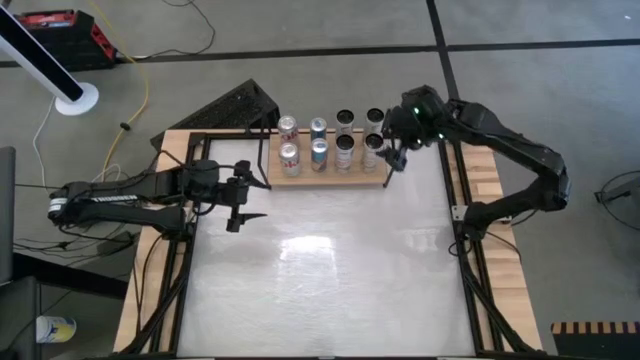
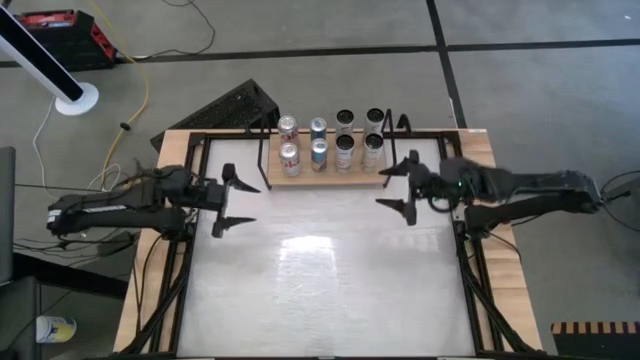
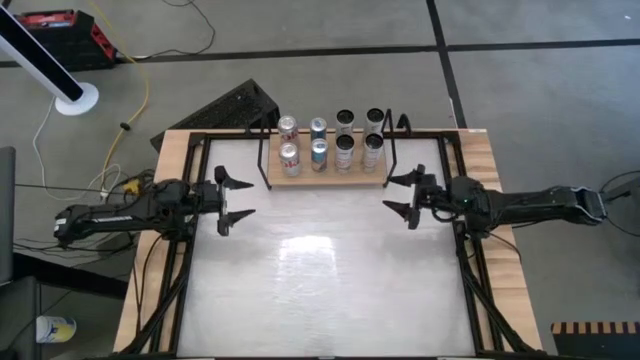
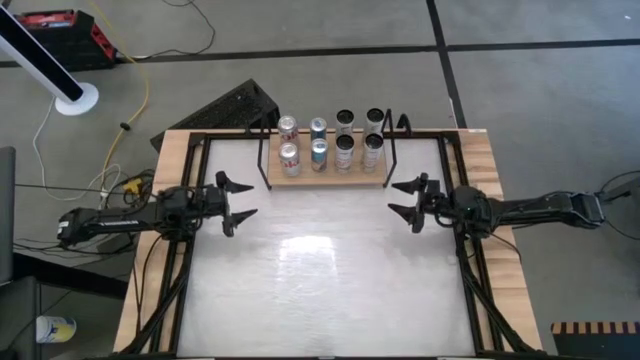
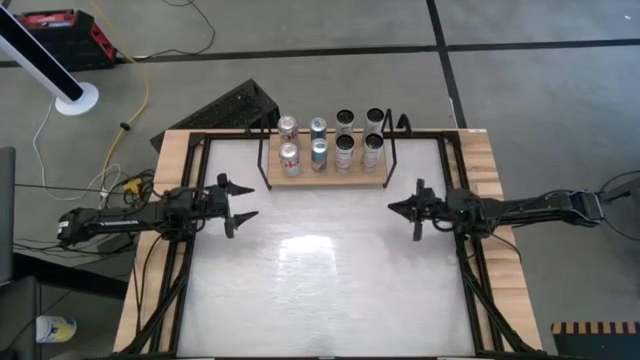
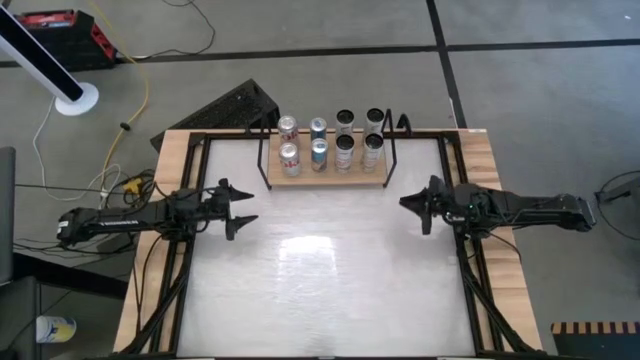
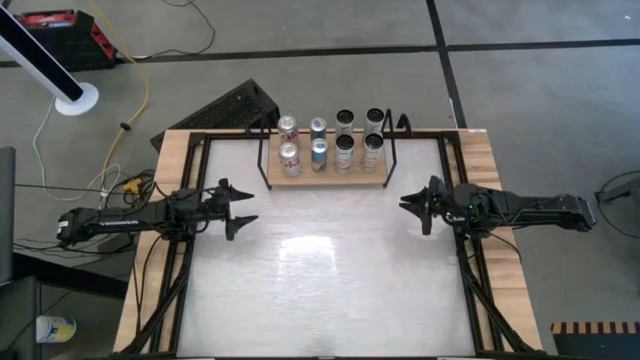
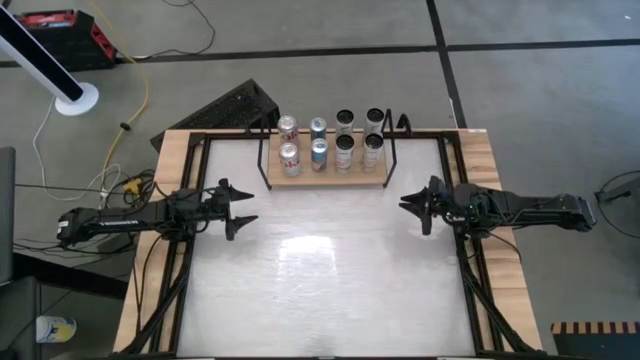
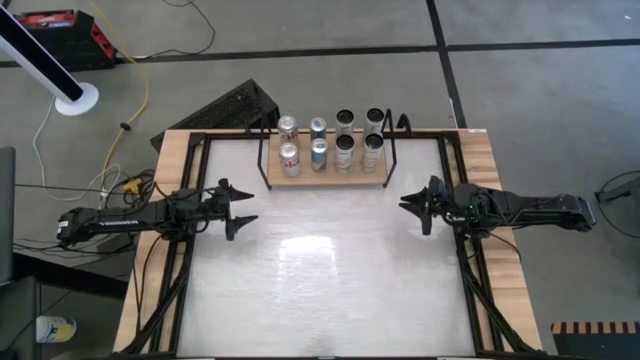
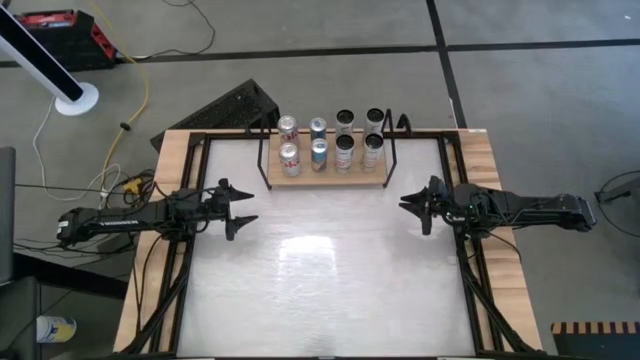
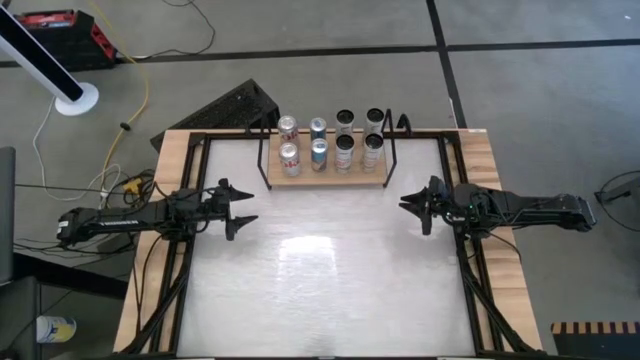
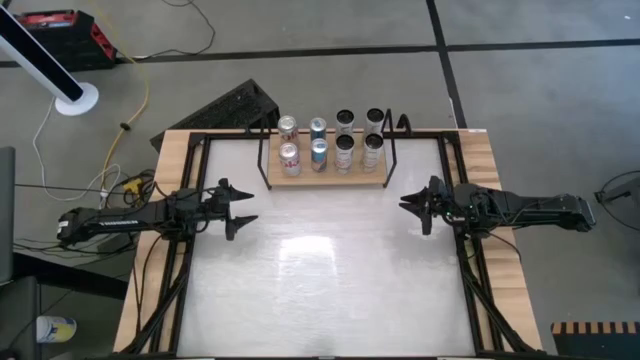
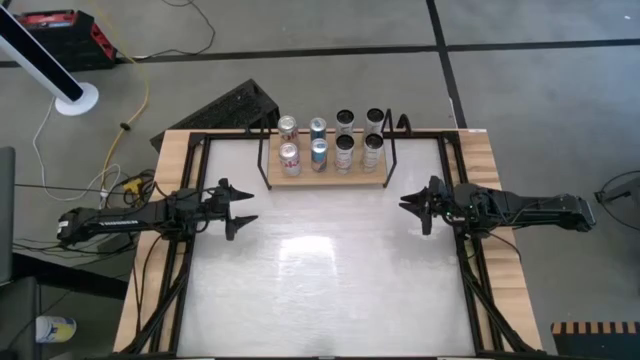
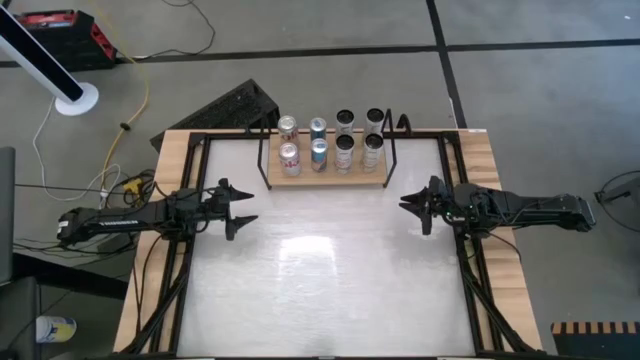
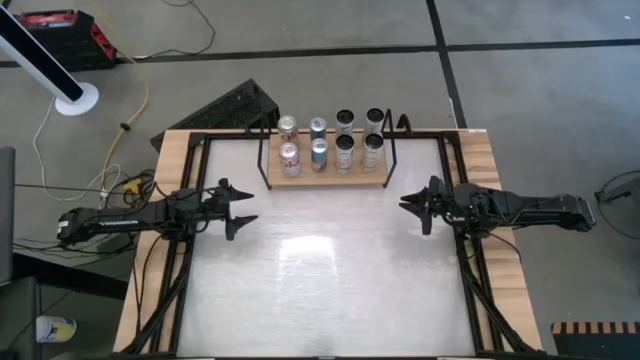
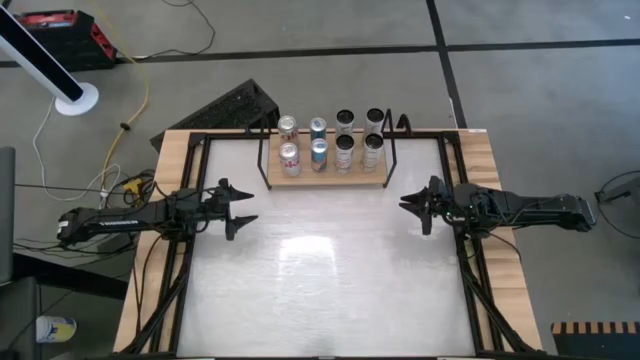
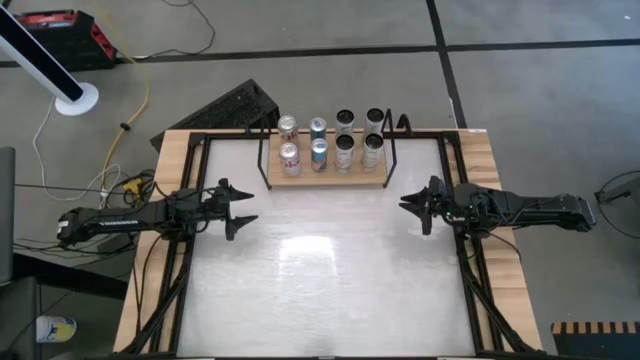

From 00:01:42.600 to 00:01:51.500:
Task: Place canned beverage on shelf
Return to Home Position

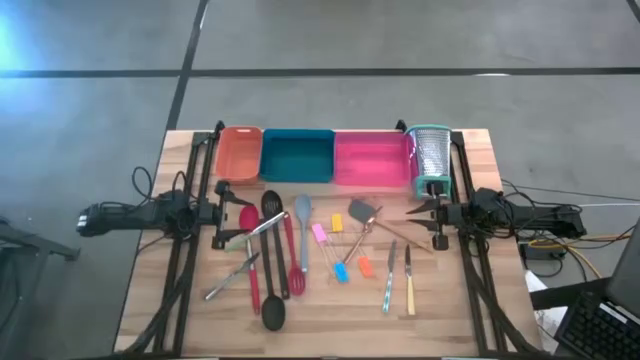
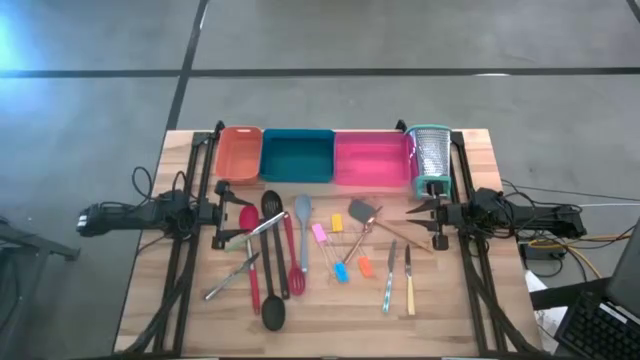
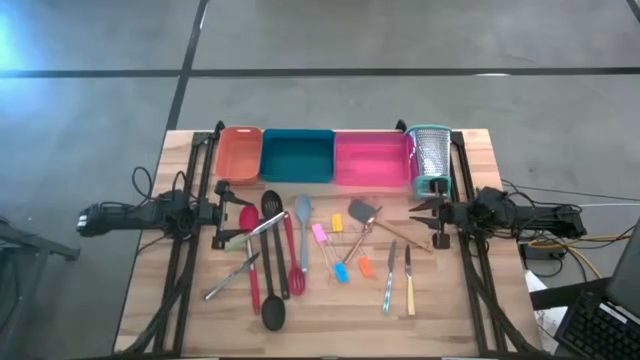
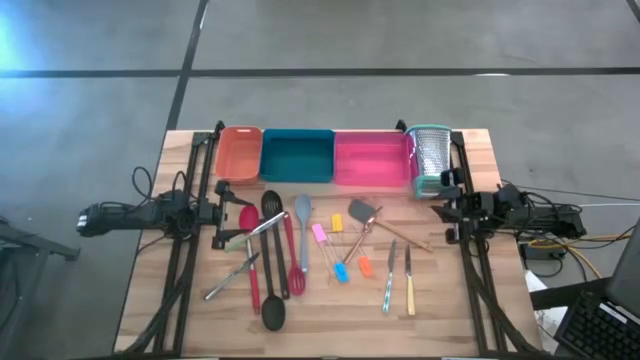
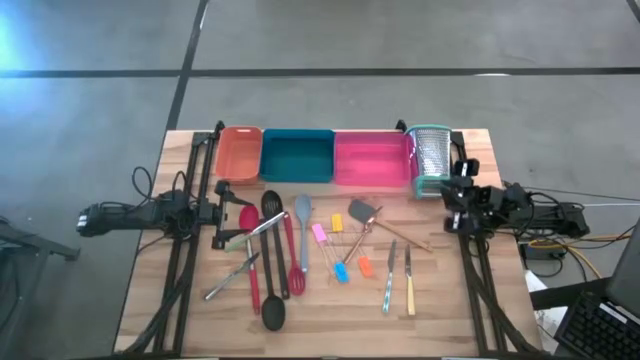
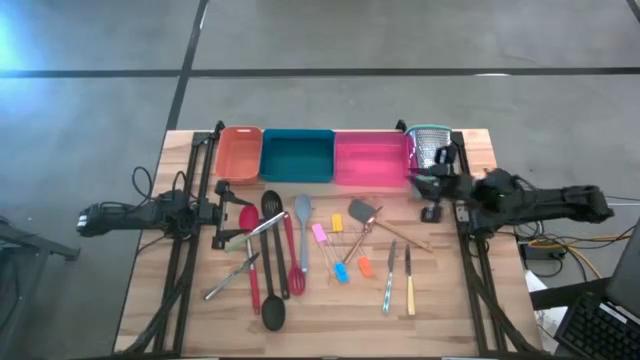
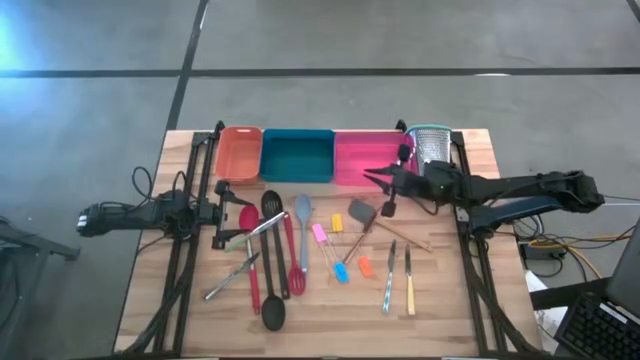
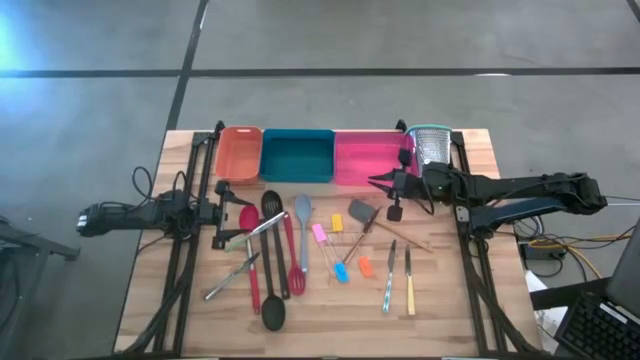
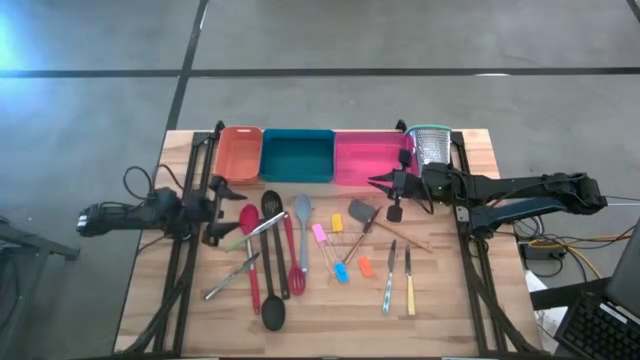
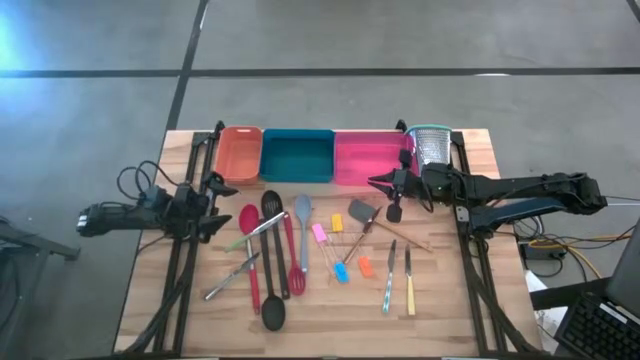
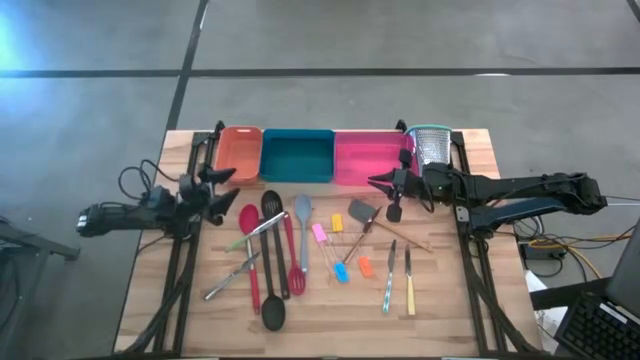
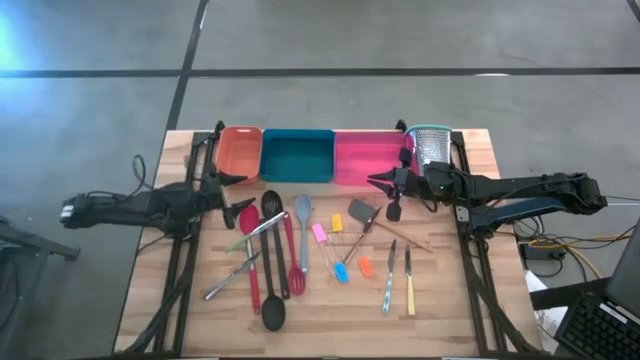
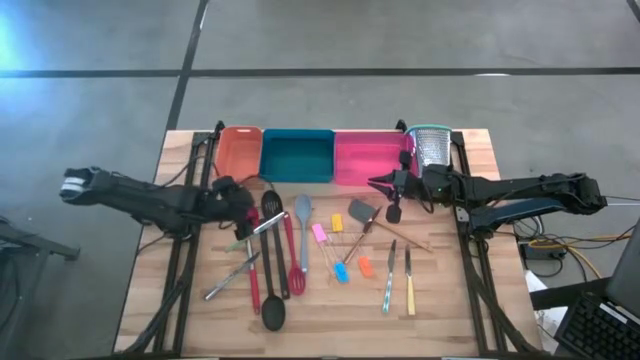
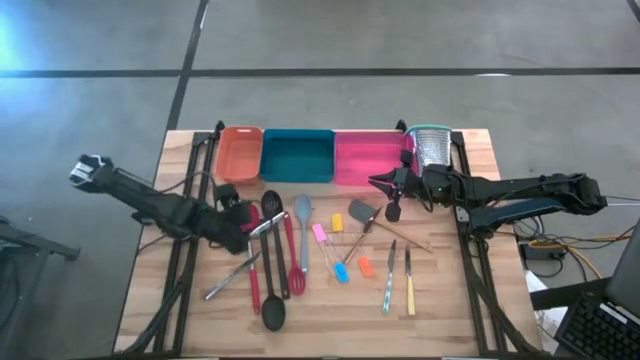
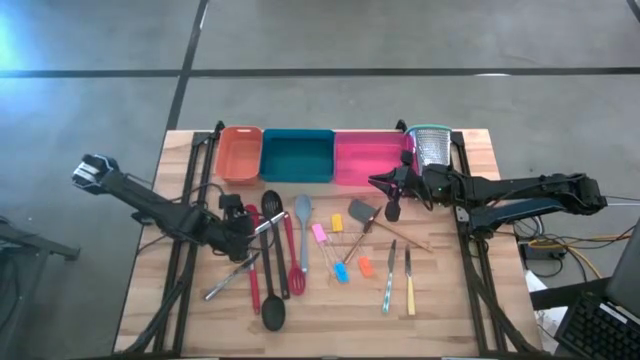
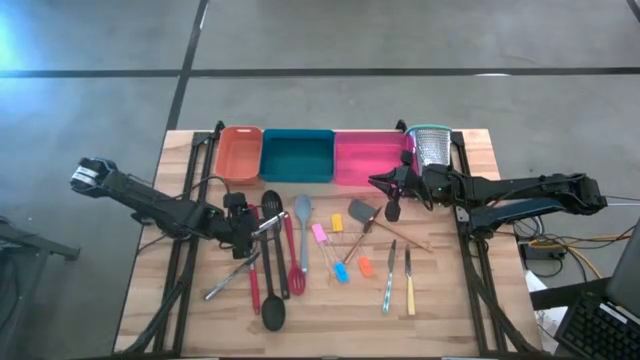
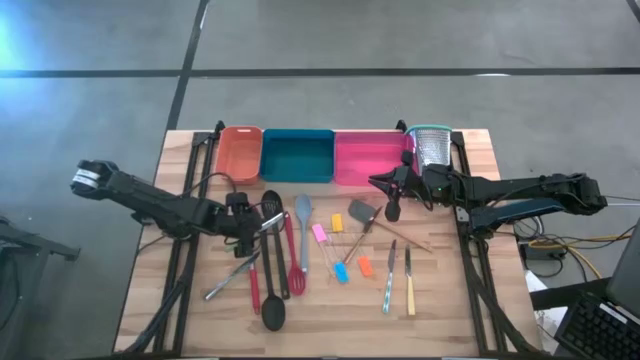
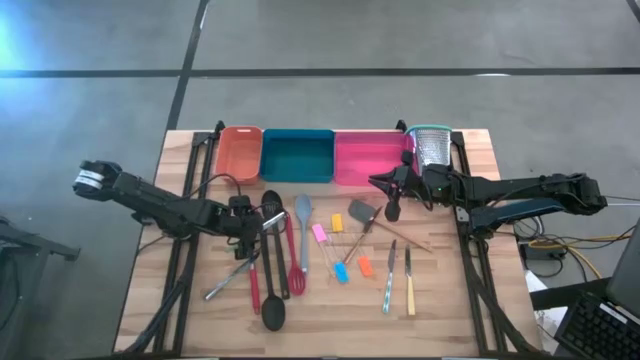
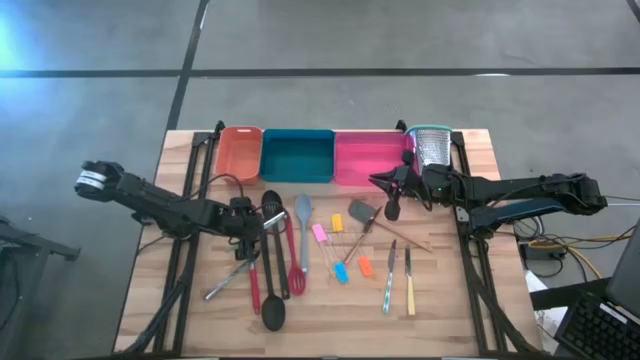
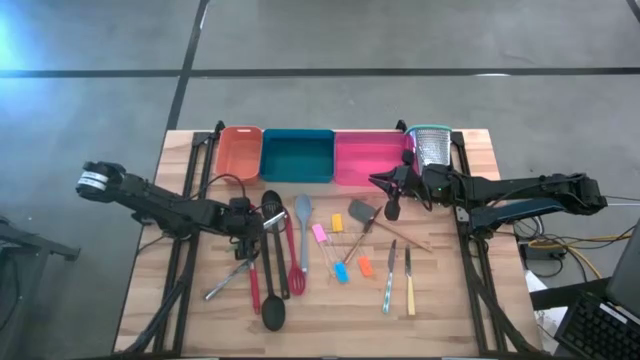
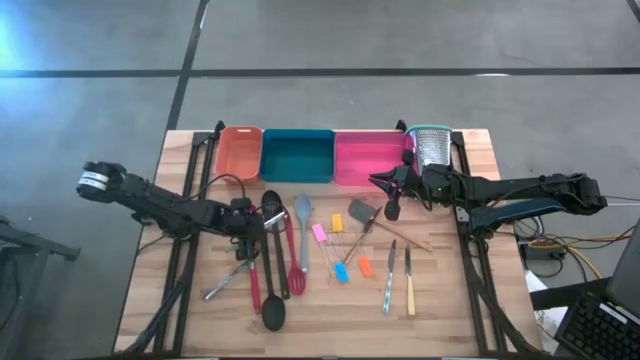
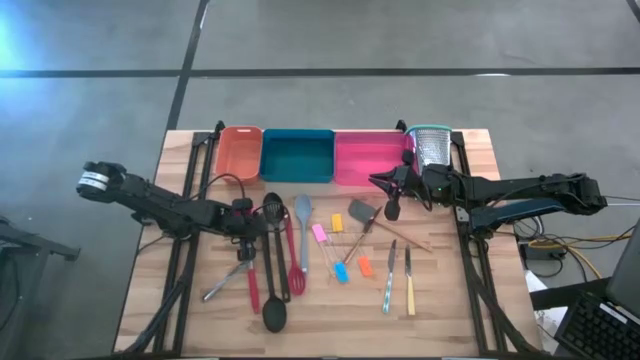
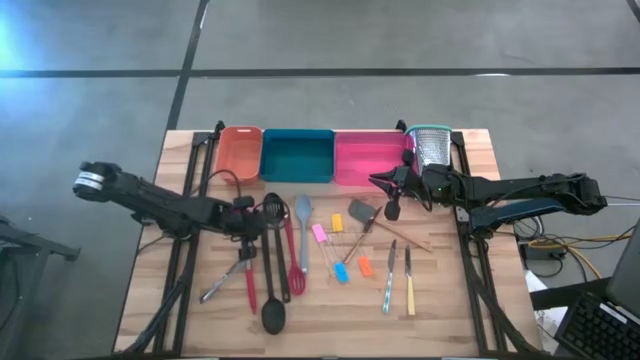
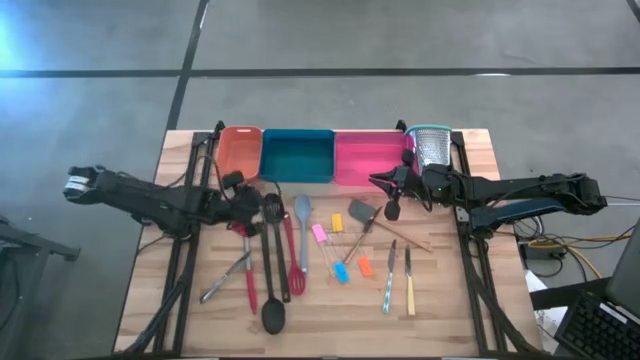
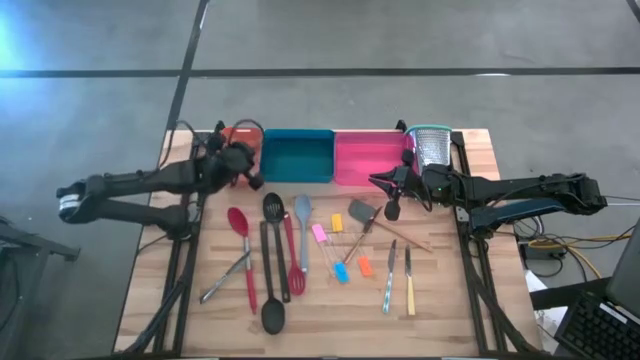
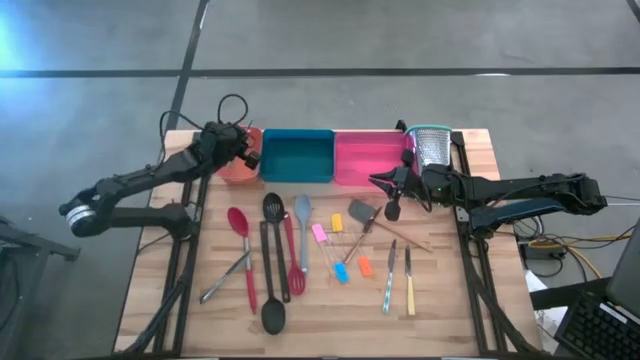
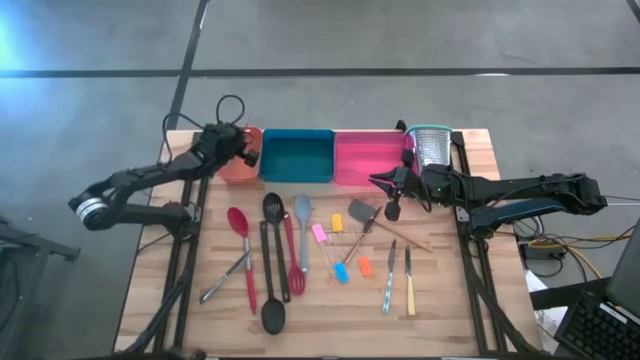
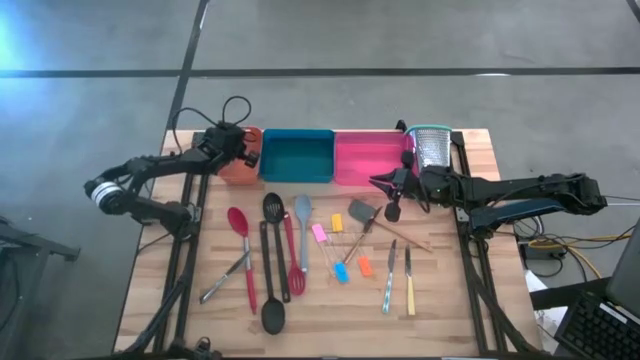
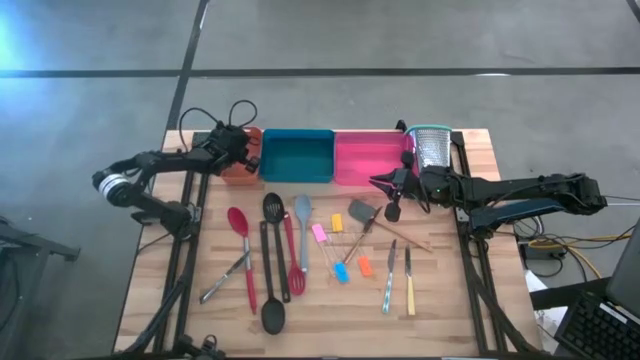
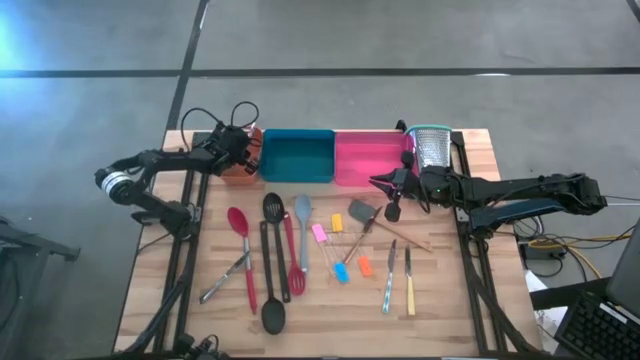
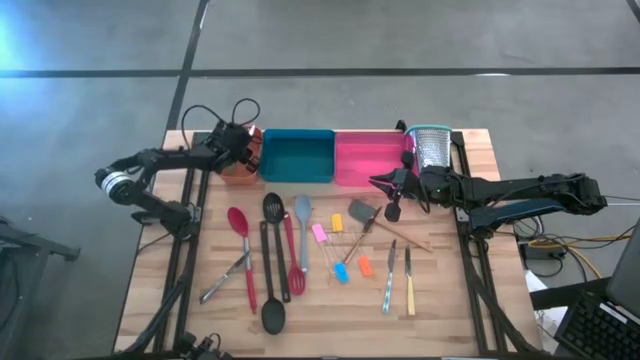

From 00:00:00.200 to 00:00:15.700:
Task: Pick & Place Kitchen Items
Put the green knife into the orange bin
